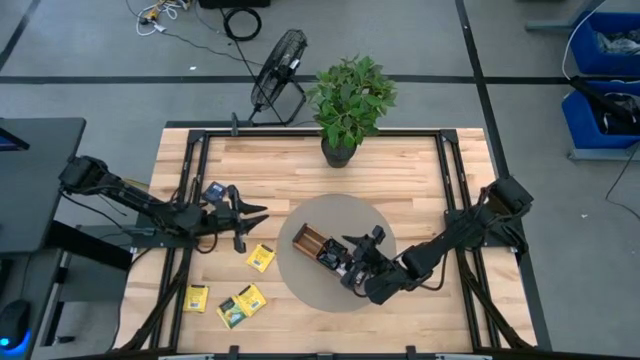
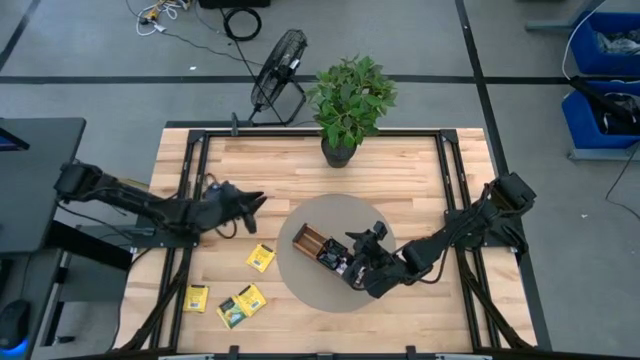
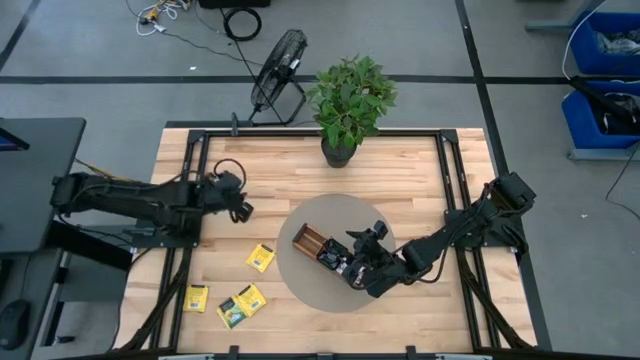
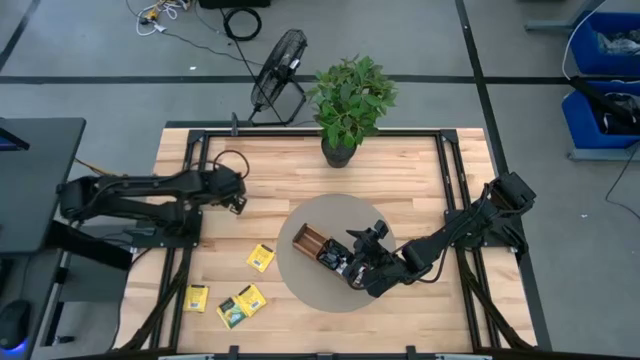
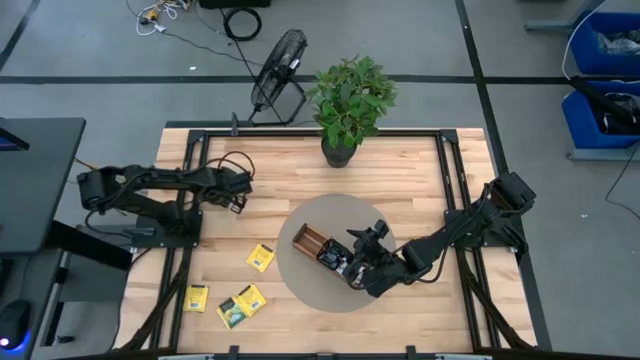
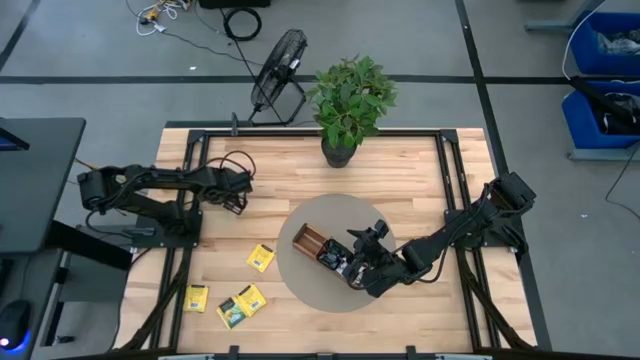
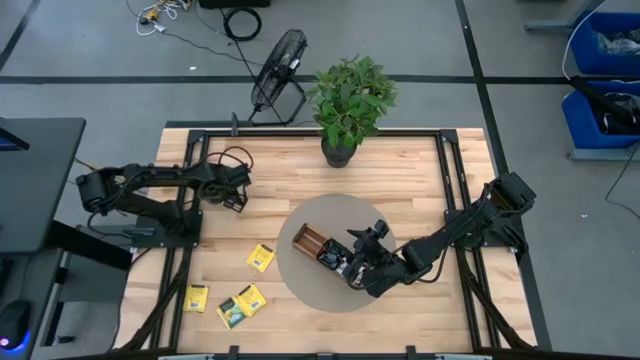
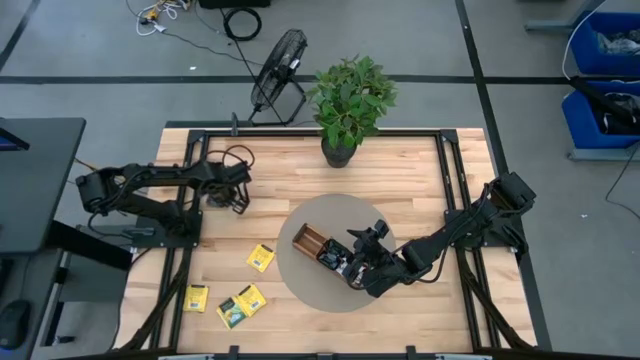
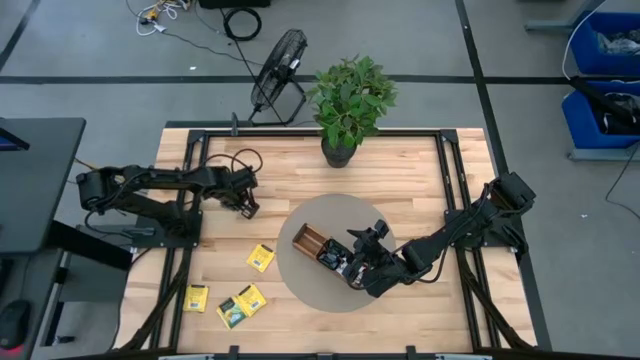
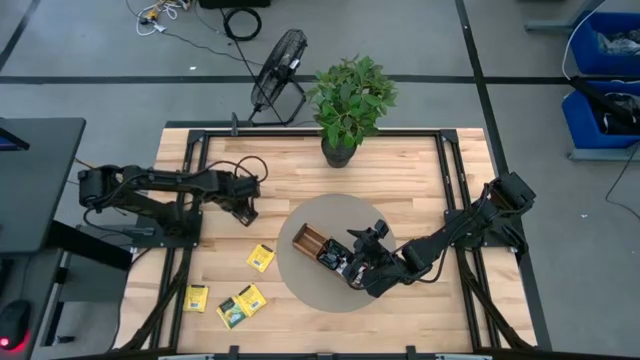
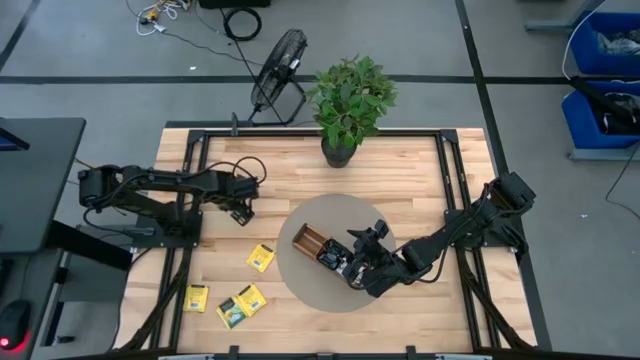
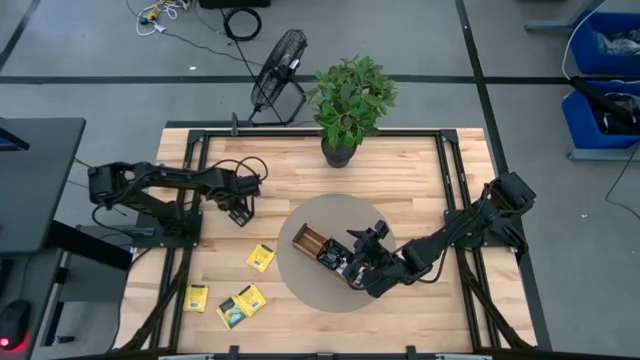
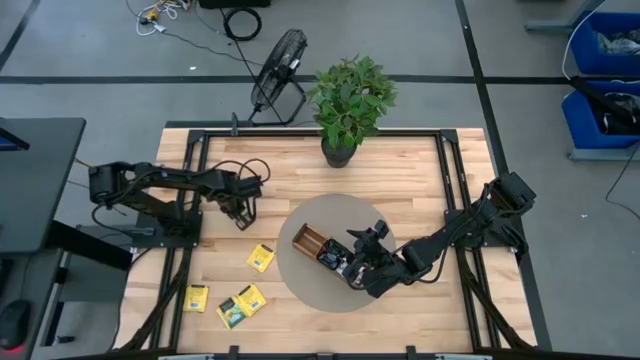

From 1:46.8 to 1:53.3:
Task: Pick & Place Tea
Put the purple tea bag into the middle section of the wooden organizer

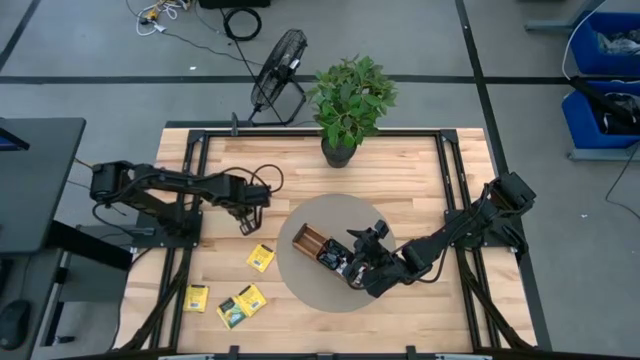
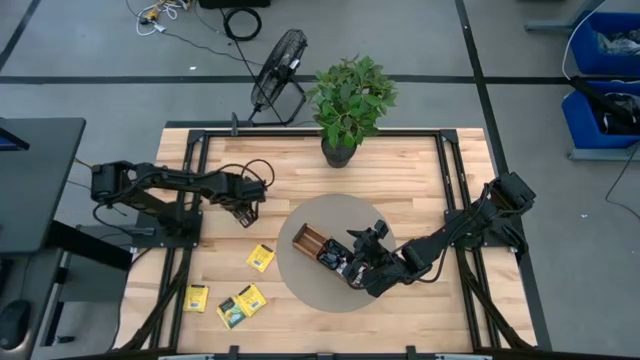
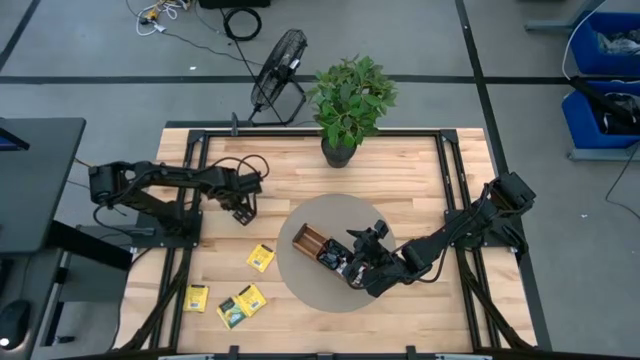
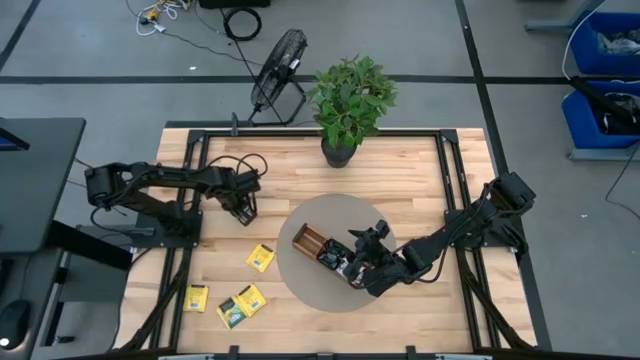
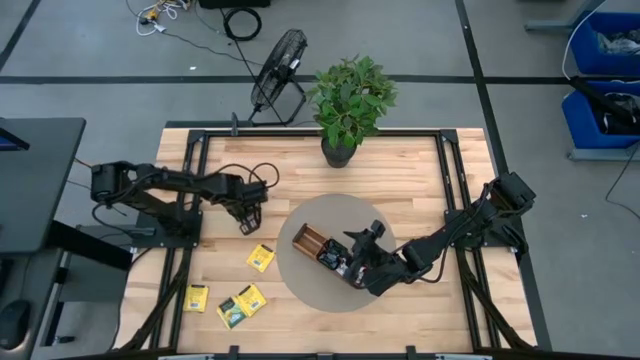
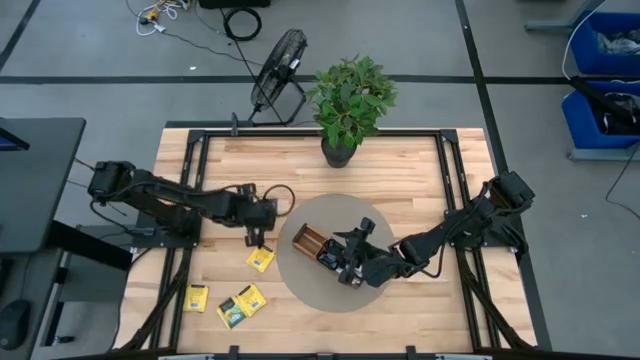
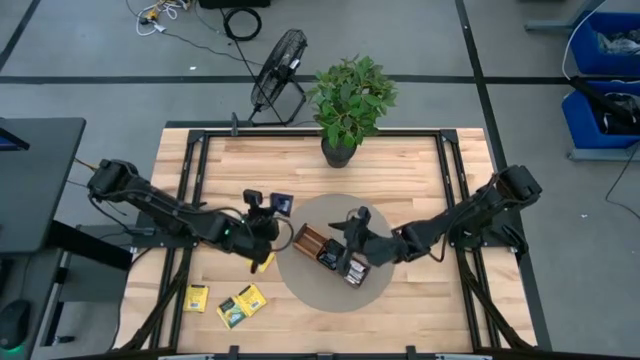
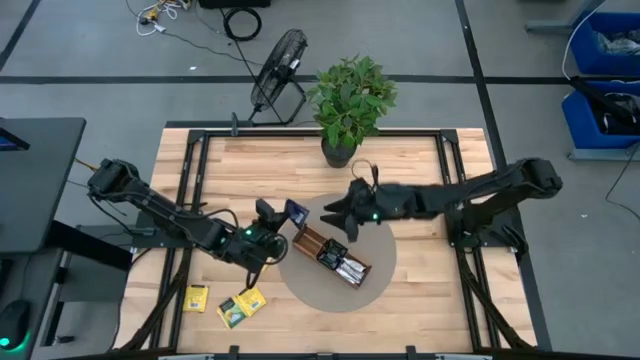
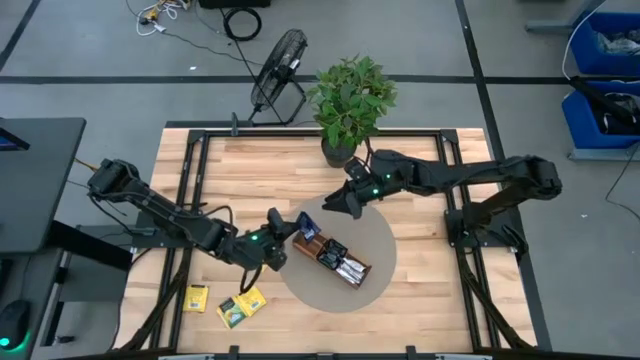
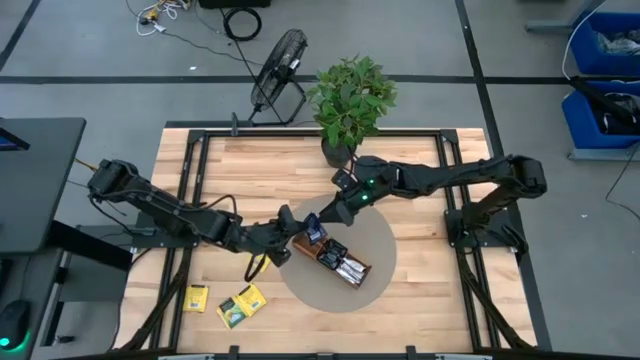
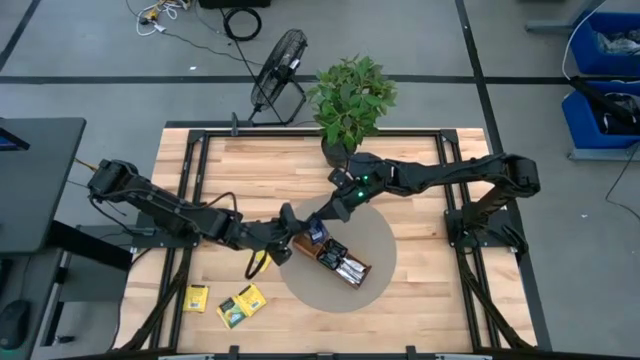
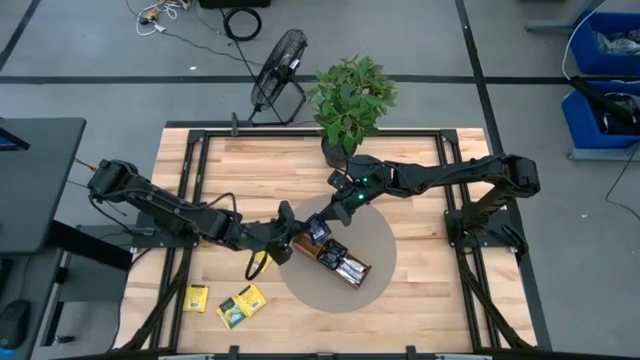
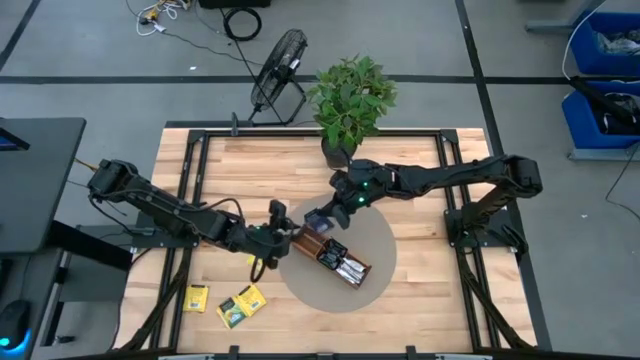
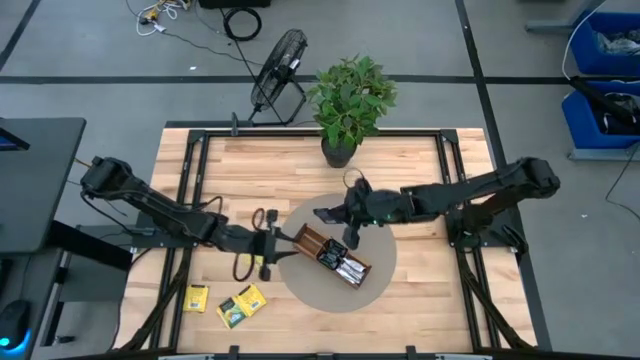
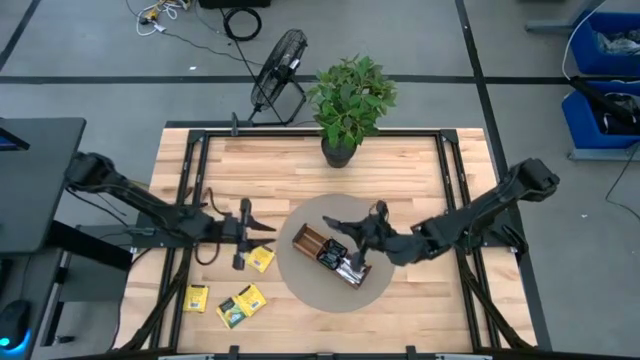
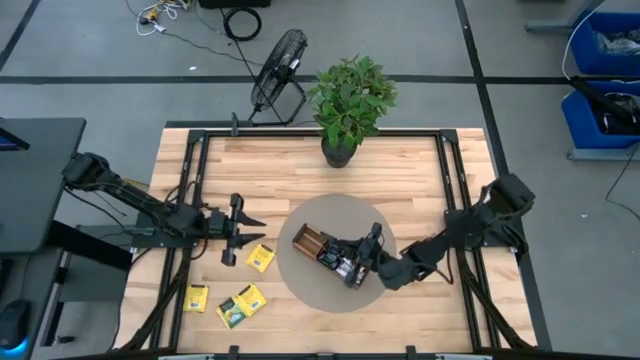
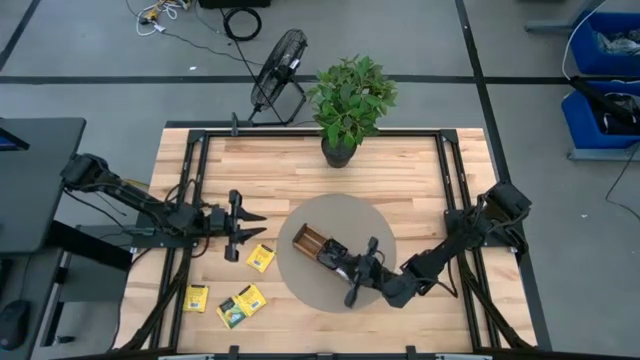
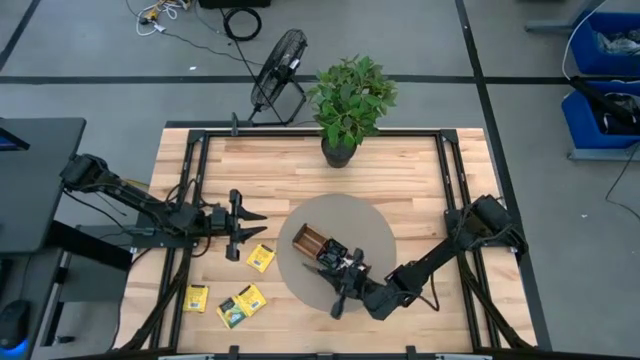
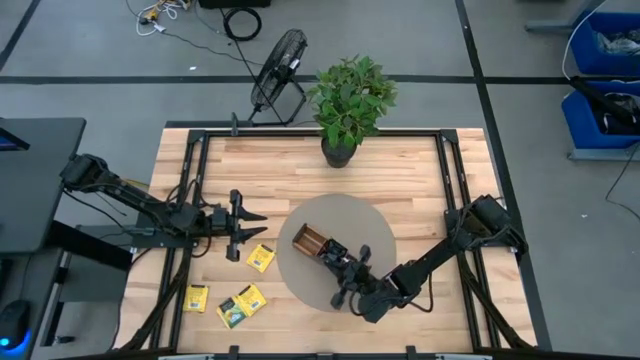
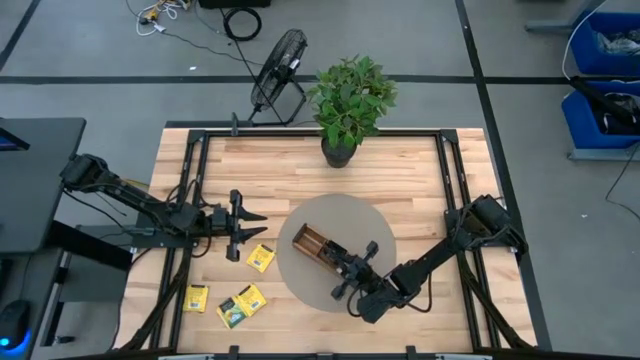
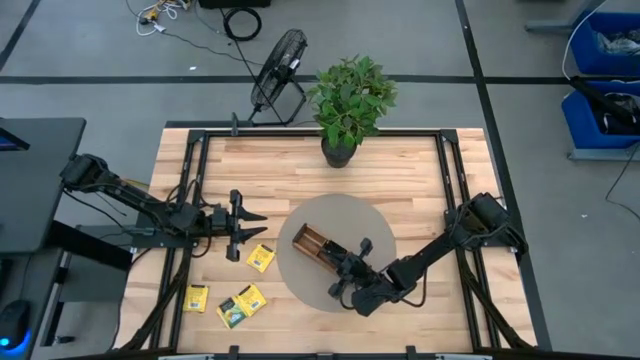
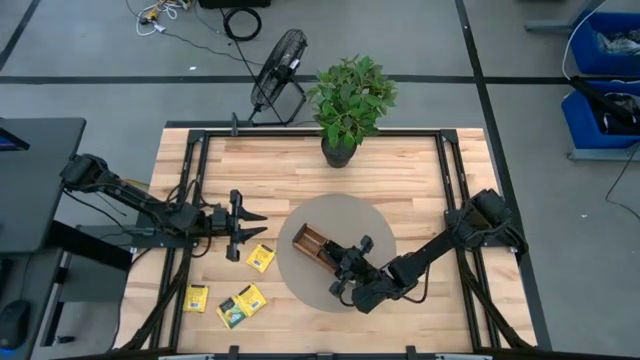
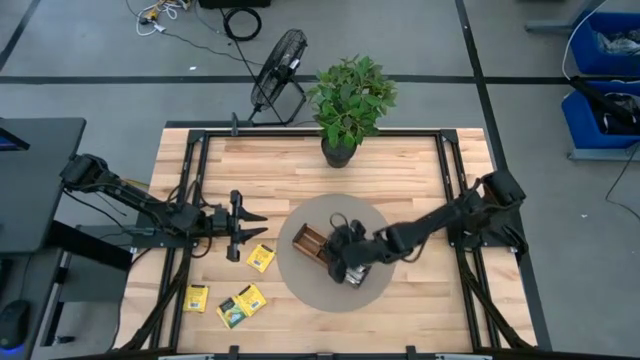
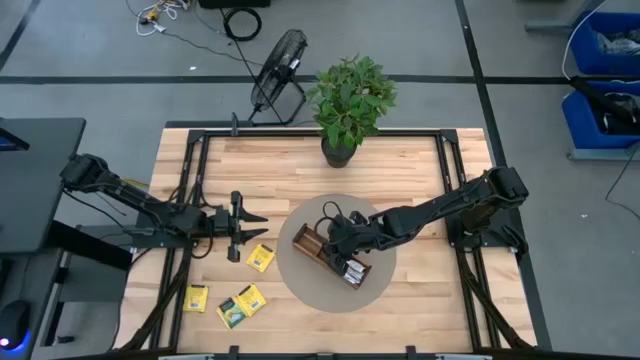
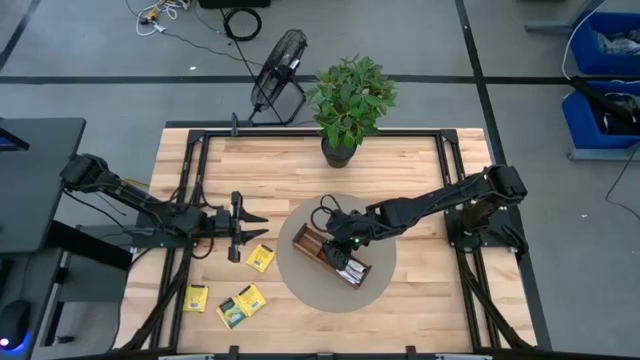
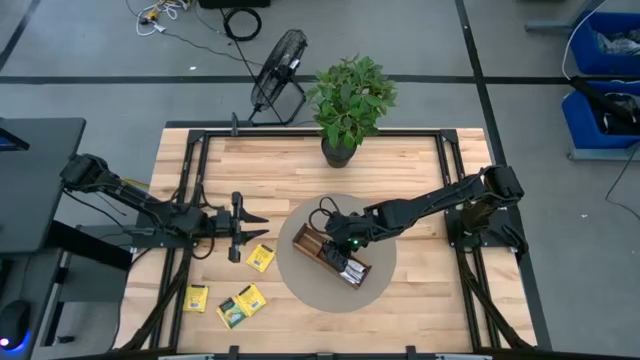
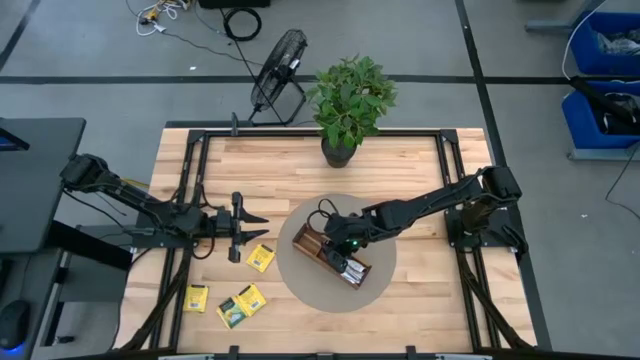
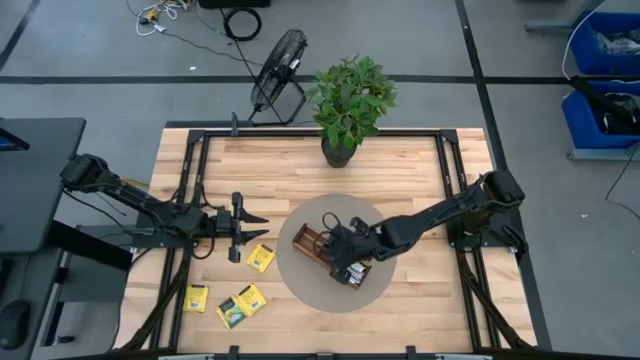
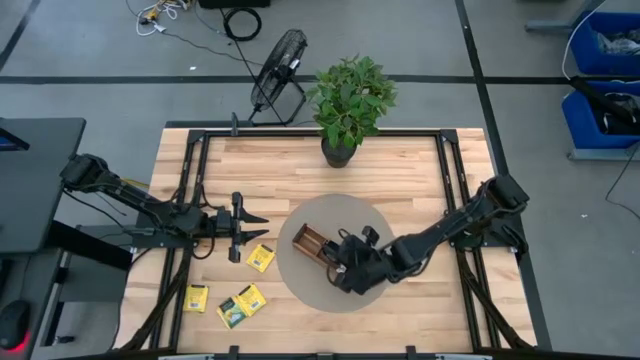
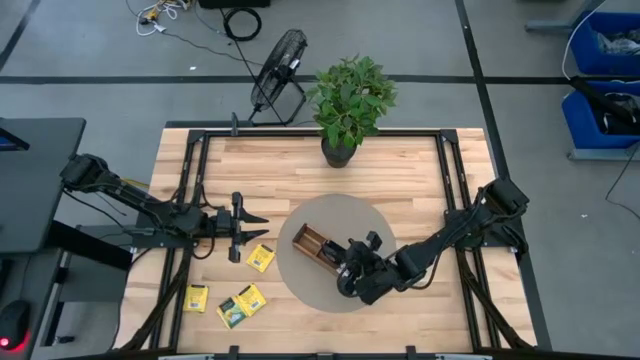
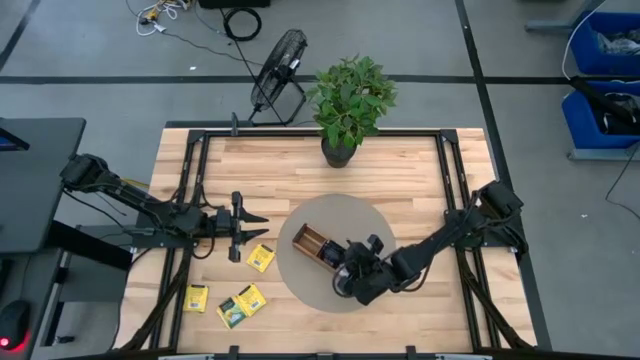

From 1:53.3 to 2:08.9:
Put the purple tea bag into the middle section of the wooden organizer
